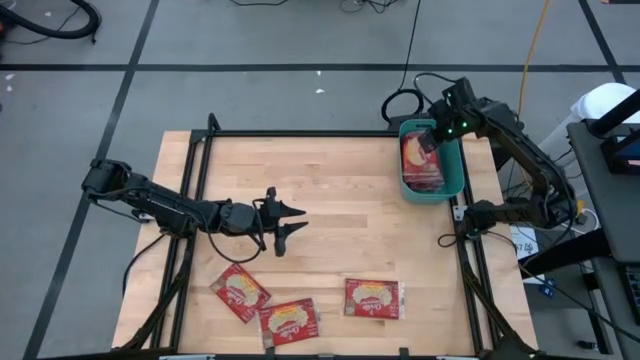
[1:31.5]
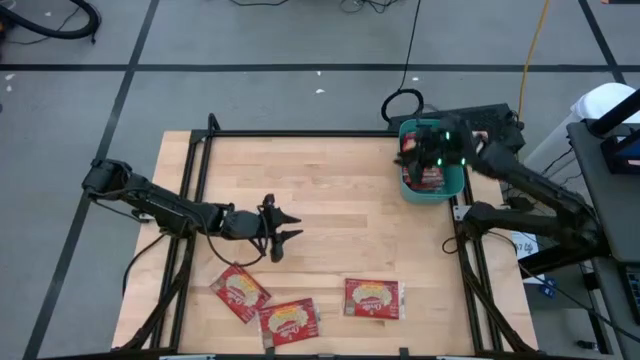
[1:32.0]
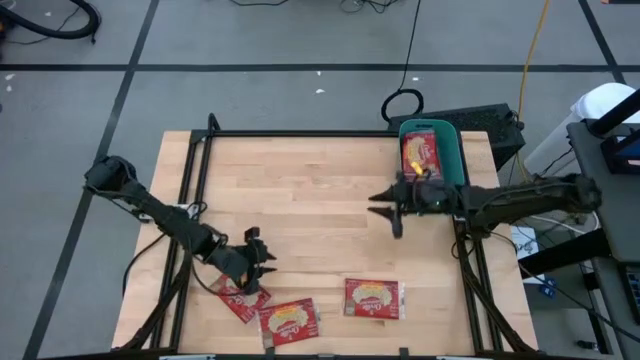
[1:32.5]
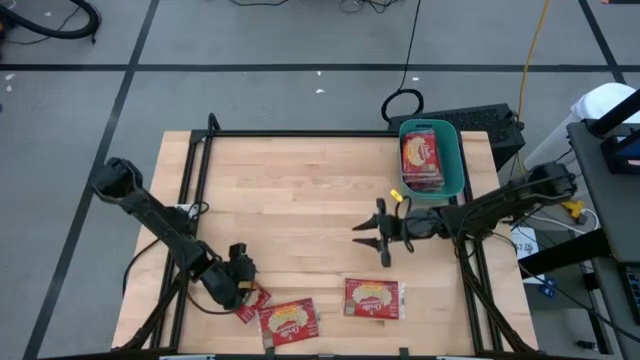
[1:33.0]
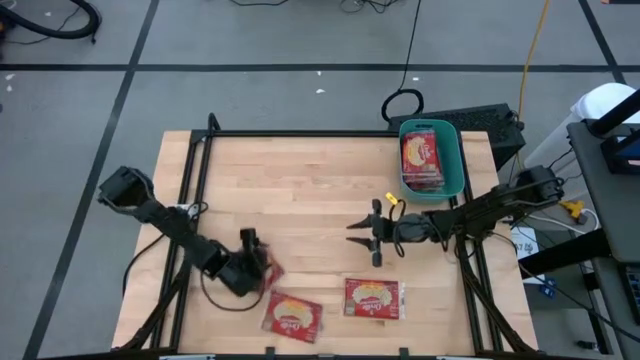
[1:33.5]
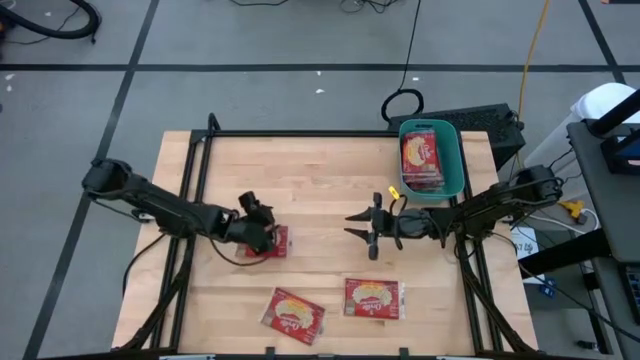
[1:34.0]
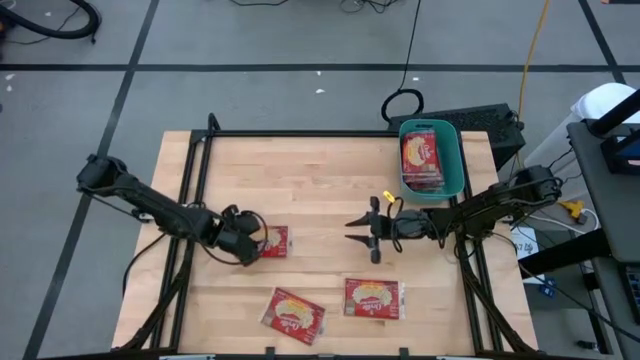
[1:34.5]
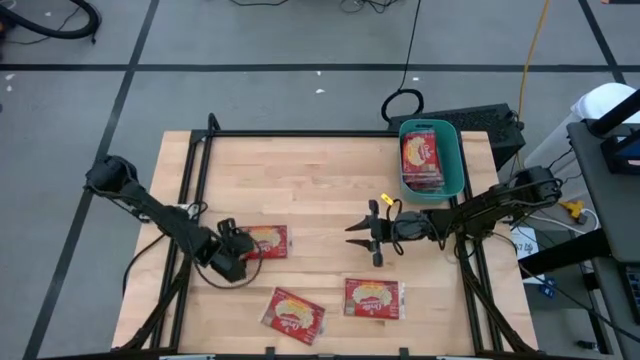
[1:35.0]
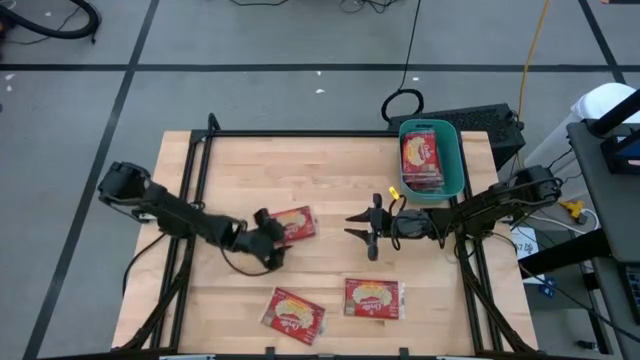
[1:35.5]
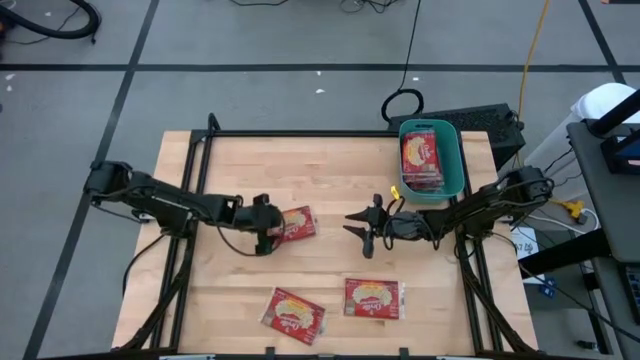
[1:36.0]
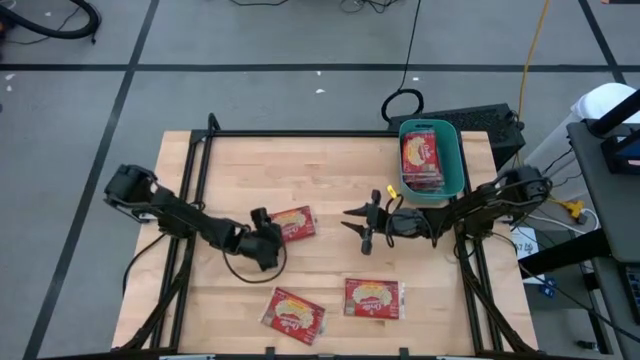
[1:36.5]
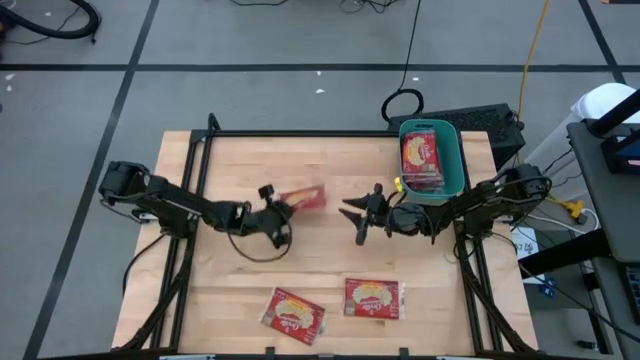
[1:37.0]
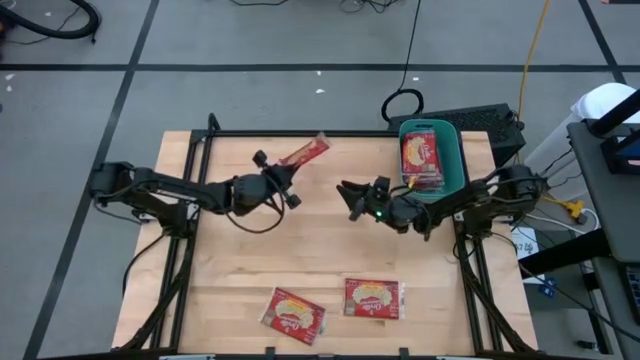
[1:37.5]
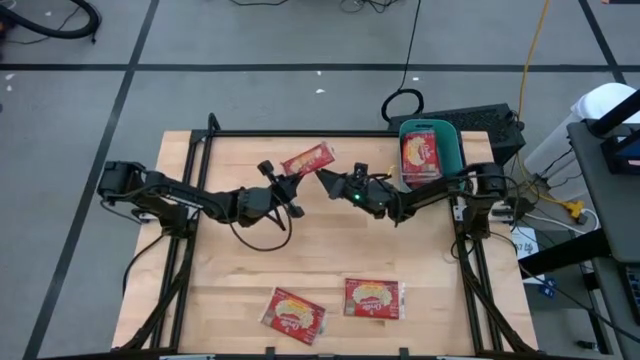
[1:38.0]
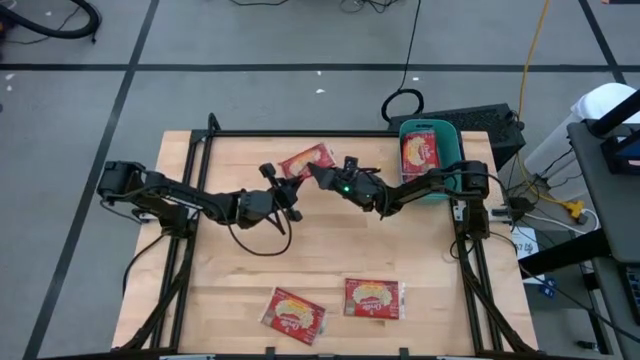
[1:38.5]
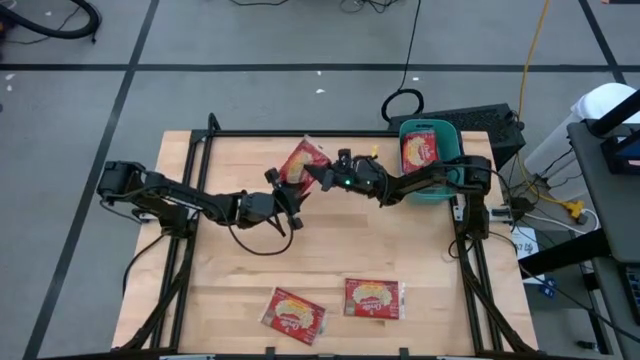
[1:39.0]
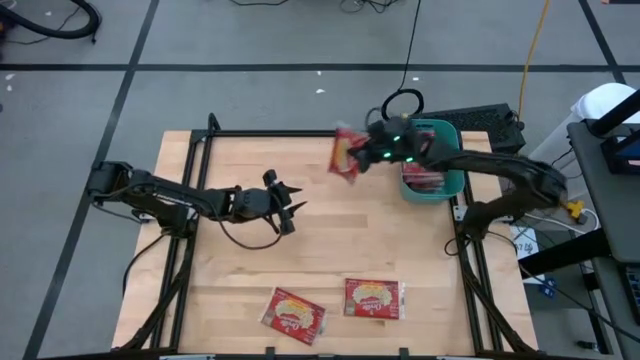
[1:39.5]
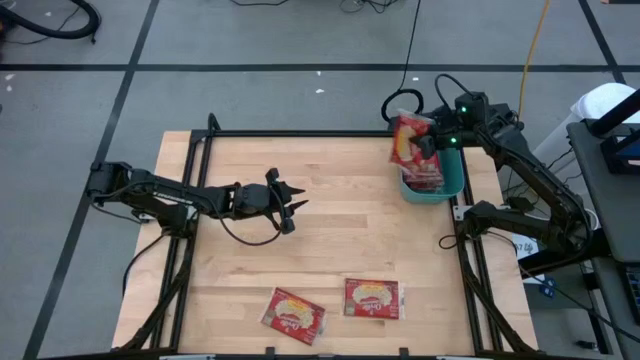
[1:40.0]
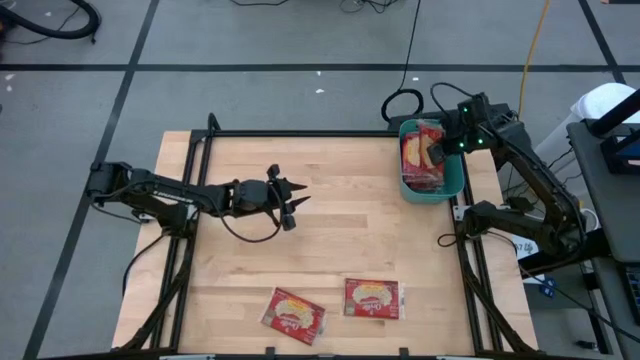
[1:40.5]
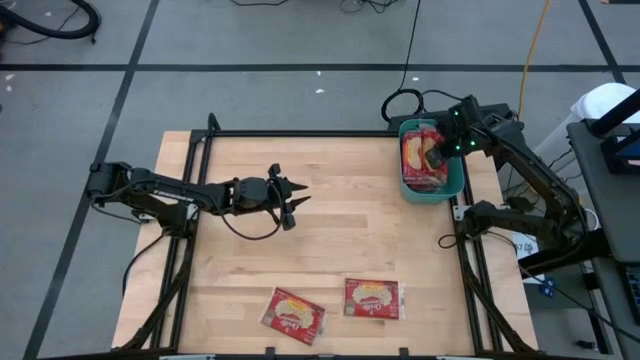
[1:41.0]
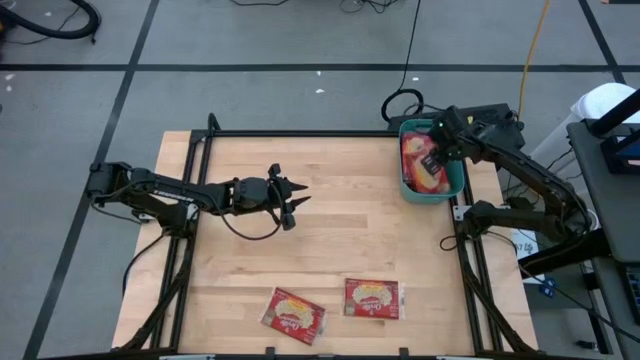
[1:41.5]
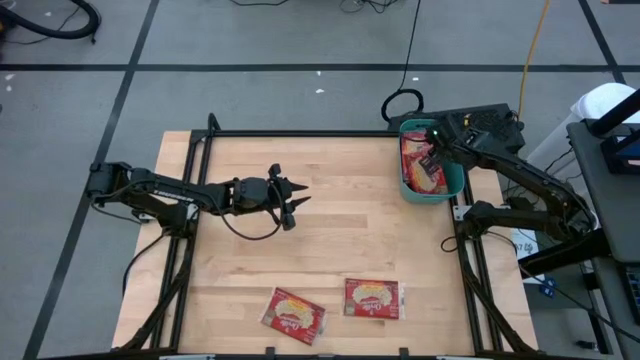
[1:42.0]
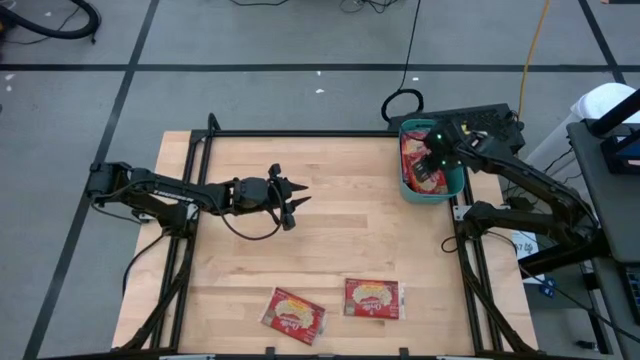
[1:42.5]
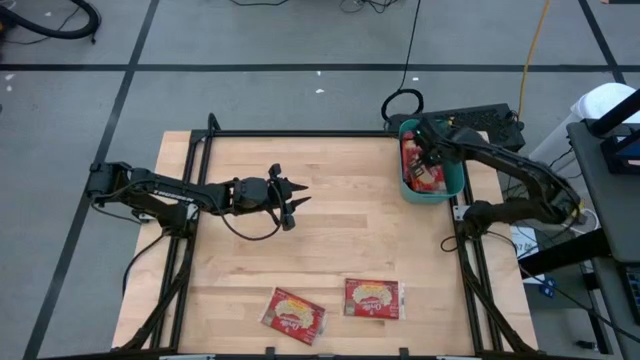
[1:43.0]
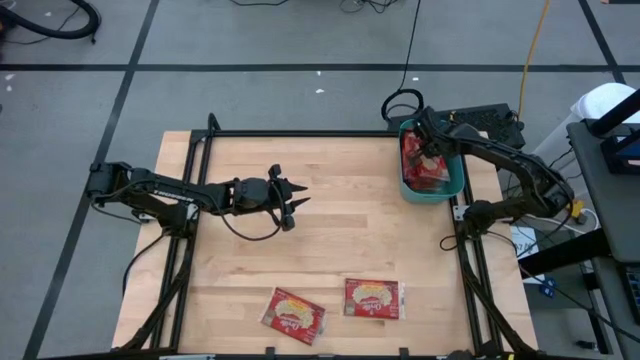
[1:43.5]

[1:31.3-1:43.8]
Task: Sort popcorn bags into baskets
Put the red popcorn bag into the green bin

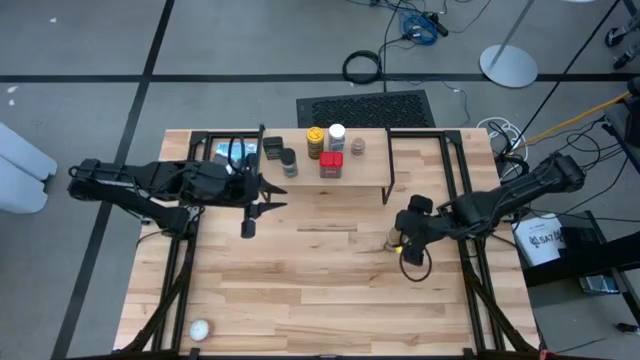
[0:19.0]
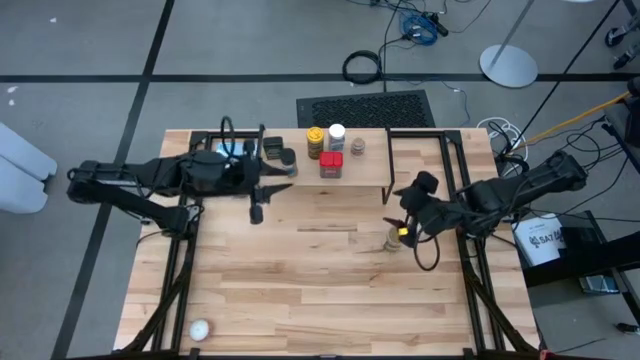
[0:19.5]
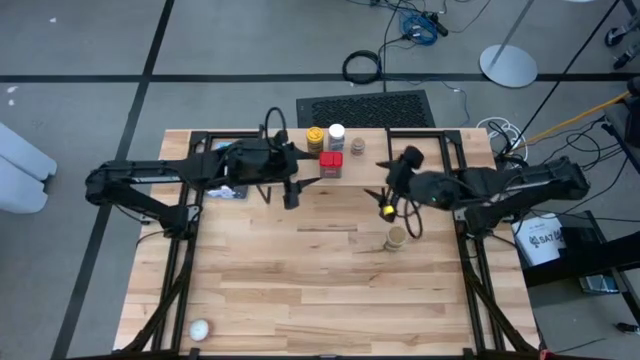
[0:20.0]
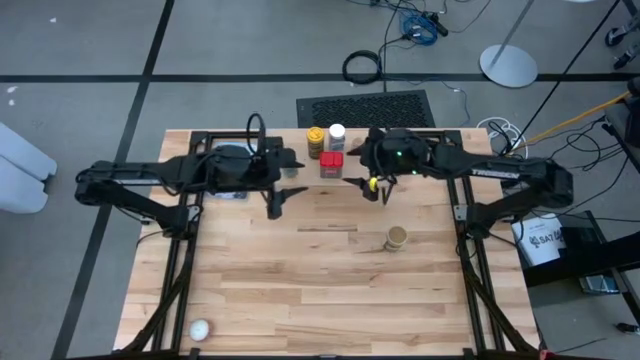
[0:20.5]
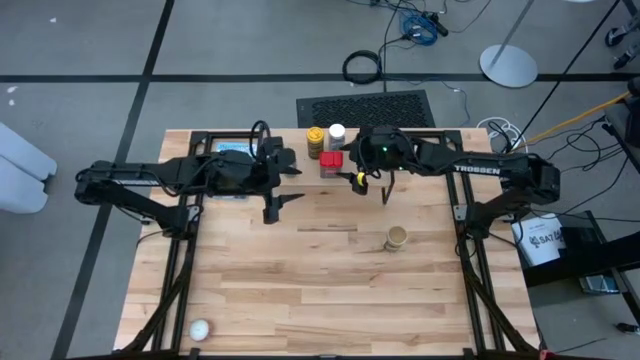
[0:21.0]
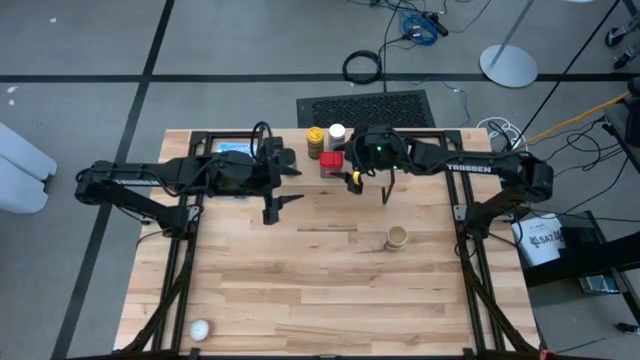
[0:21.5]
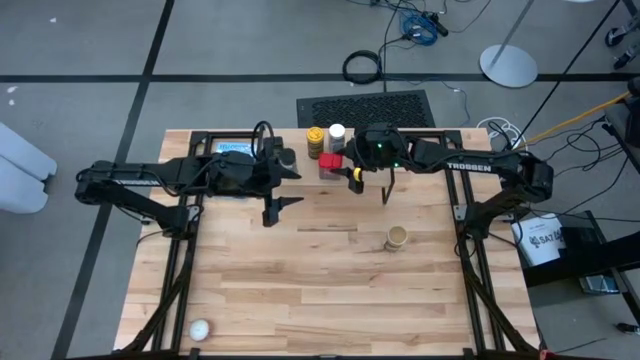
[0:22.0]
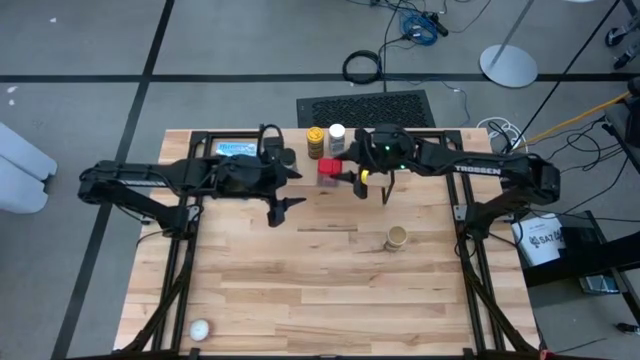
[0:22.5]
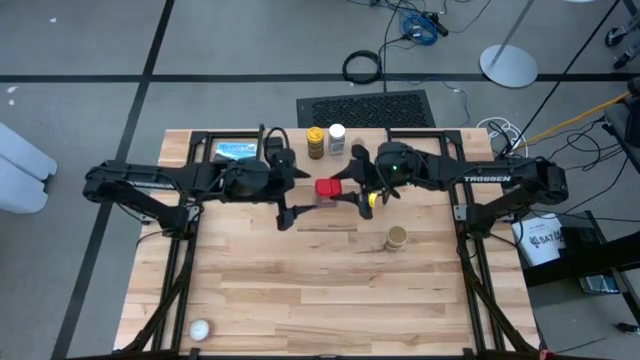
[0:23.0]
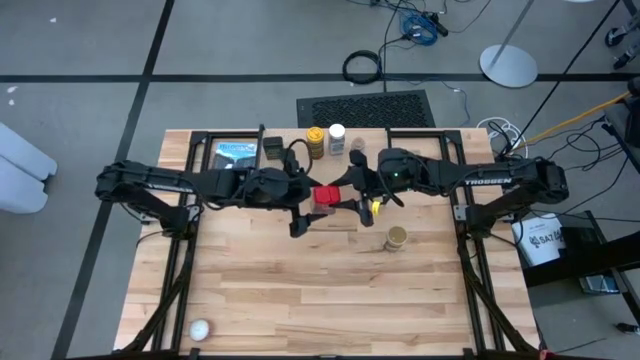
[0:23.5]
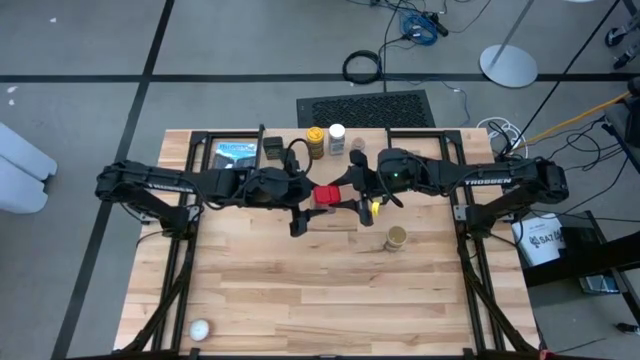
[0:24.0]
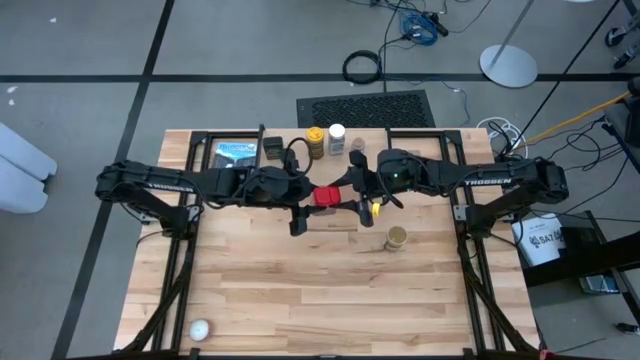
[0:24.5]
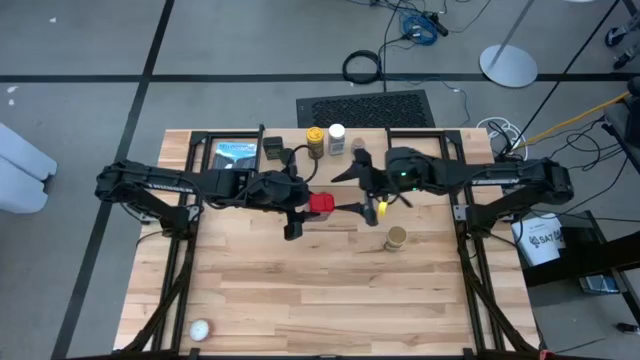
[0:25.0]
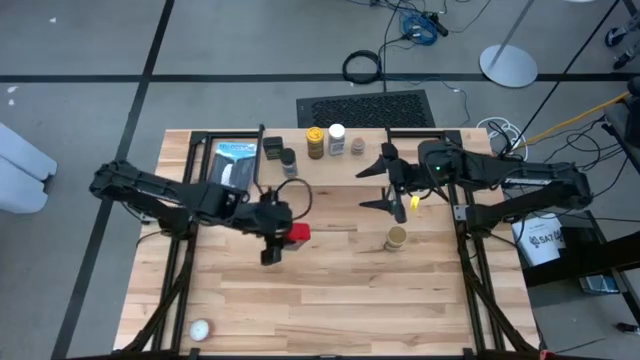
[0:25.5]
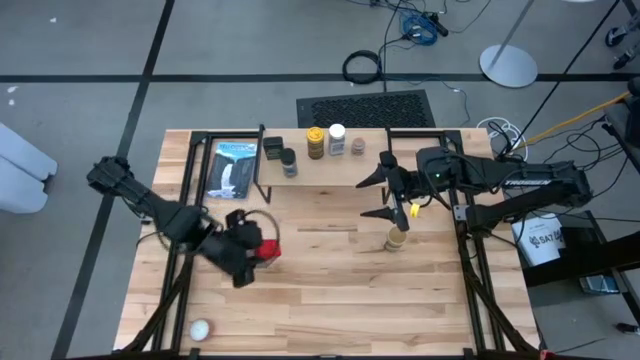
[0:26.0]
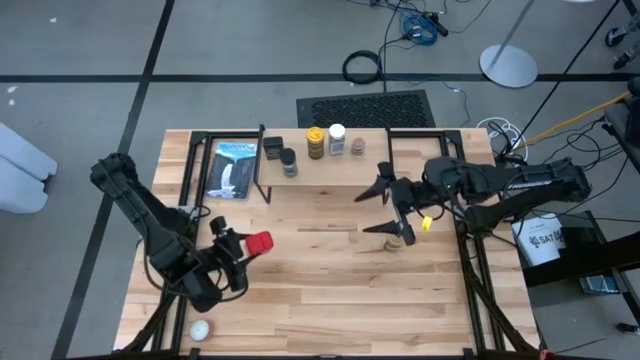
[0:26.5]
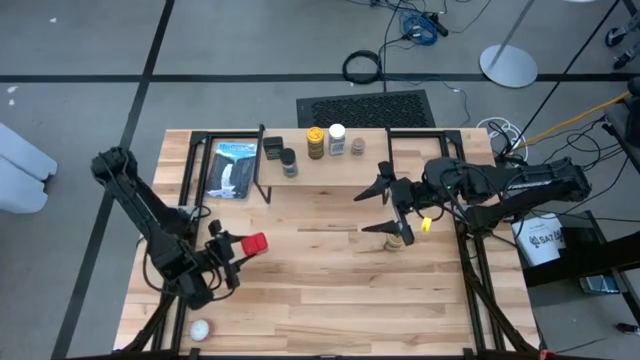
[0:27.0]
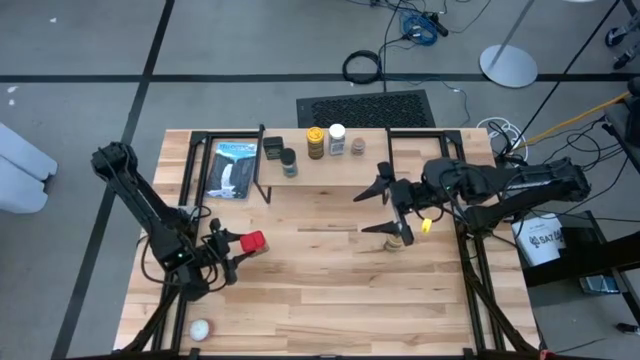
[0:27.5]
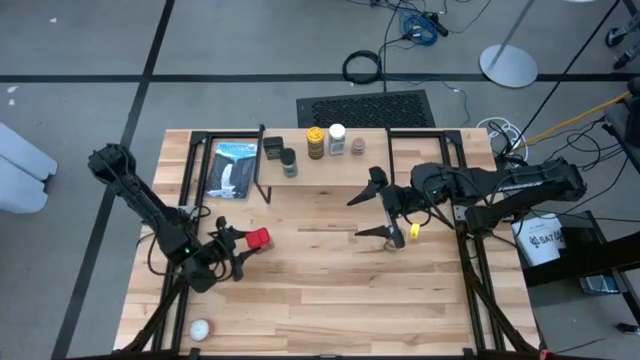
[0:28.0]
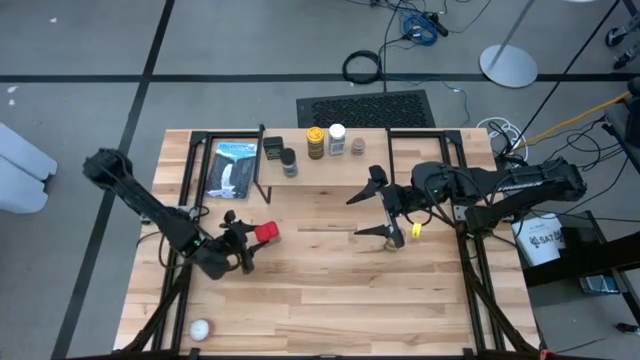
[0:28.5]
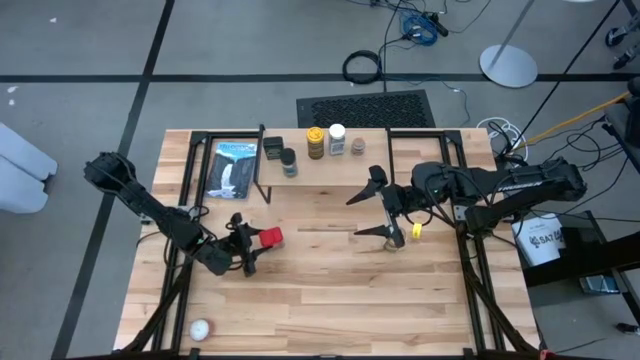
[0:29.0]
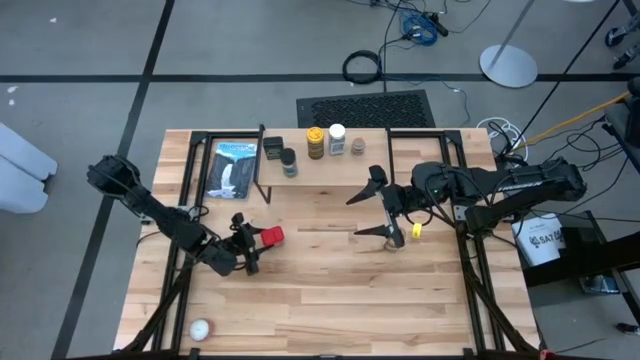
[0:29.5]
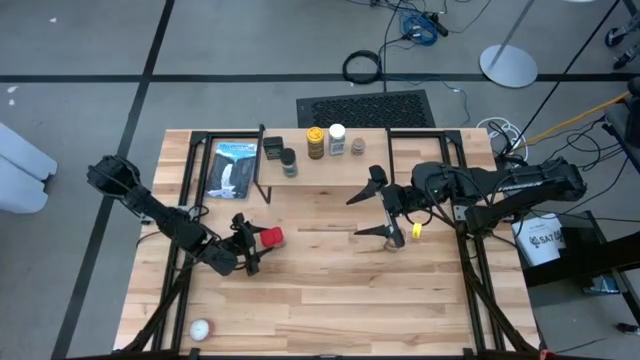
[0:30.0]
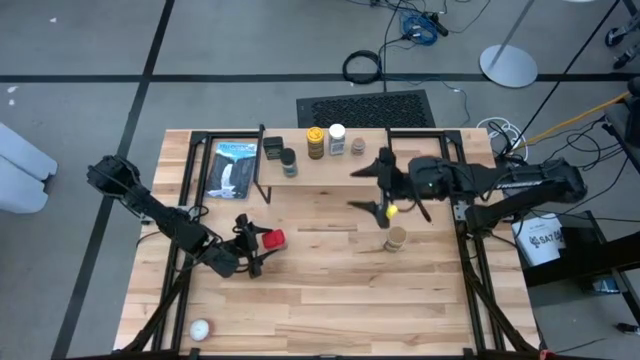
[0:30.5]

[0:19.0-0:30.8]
Task: Shelf spices
Remove the red seasoning can from the shelf
